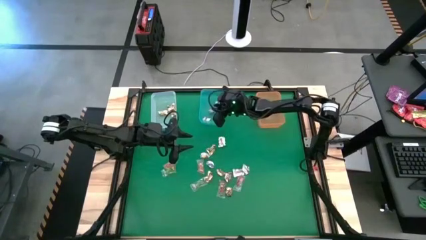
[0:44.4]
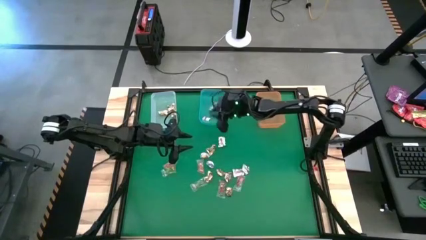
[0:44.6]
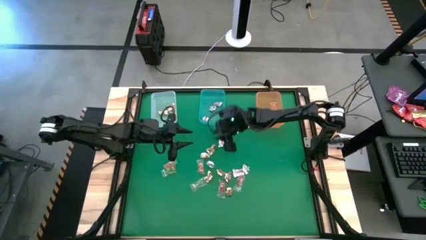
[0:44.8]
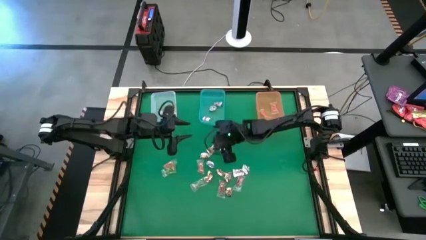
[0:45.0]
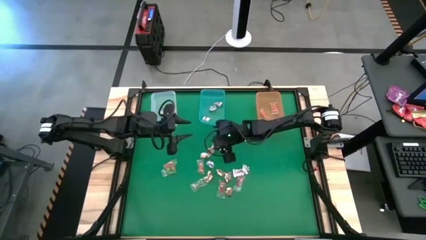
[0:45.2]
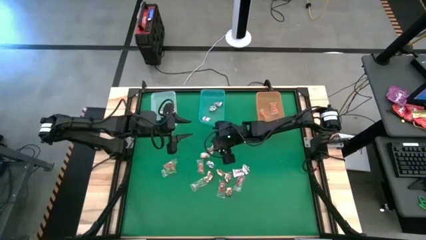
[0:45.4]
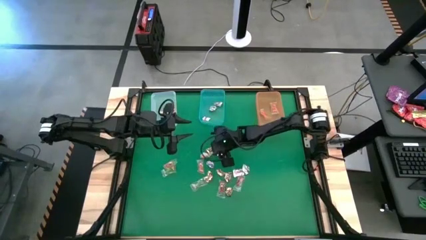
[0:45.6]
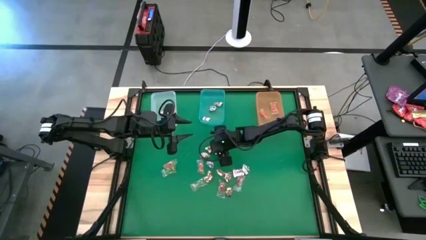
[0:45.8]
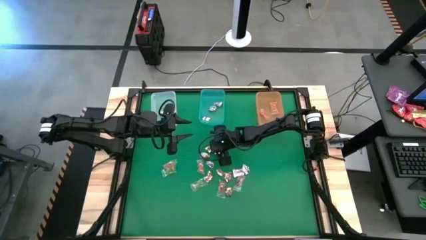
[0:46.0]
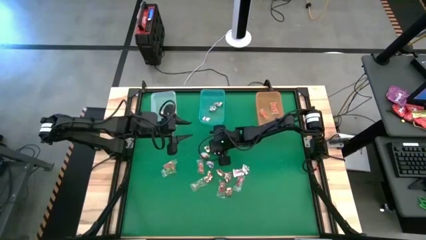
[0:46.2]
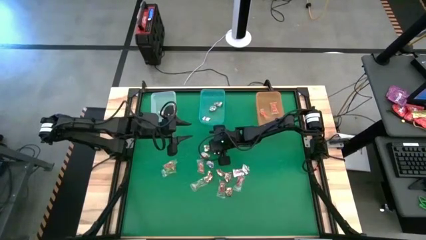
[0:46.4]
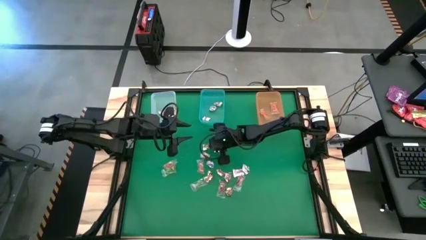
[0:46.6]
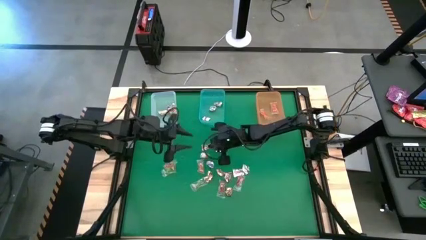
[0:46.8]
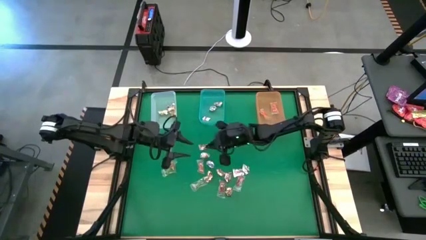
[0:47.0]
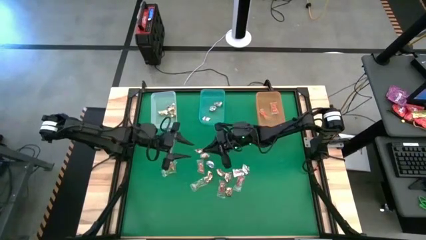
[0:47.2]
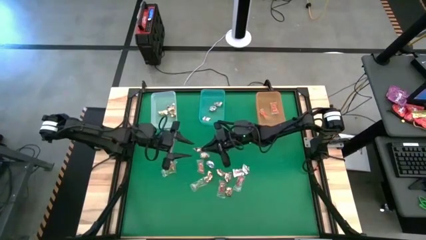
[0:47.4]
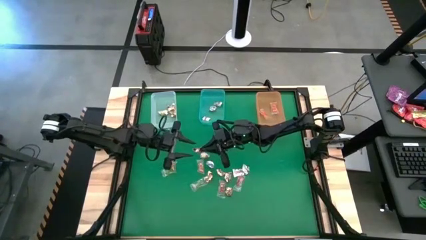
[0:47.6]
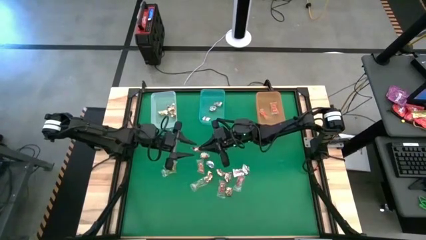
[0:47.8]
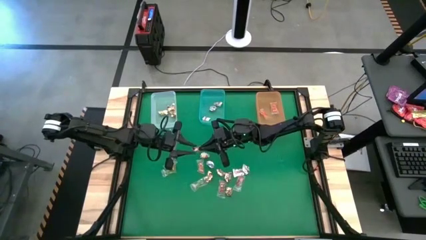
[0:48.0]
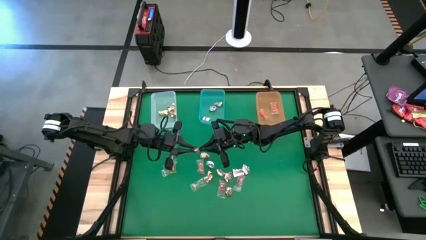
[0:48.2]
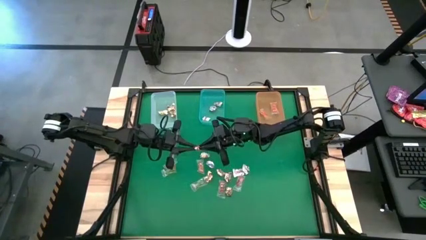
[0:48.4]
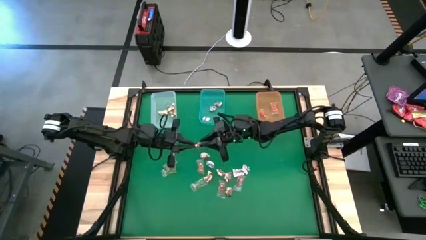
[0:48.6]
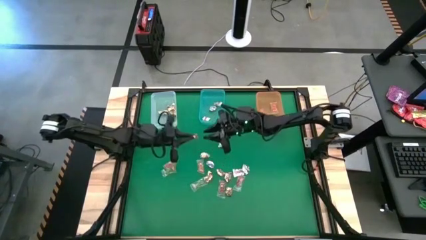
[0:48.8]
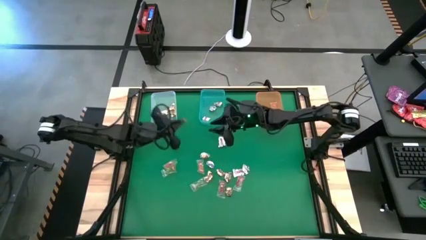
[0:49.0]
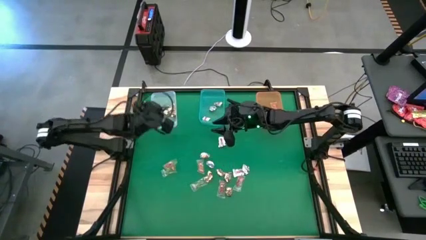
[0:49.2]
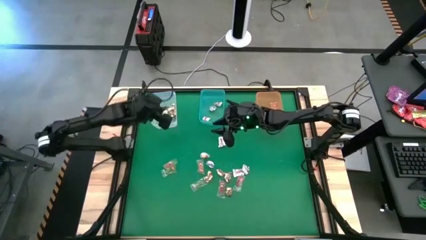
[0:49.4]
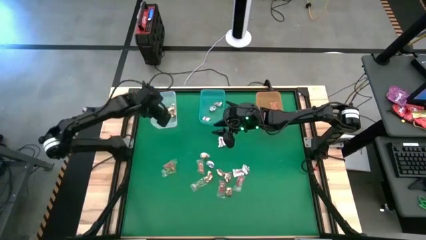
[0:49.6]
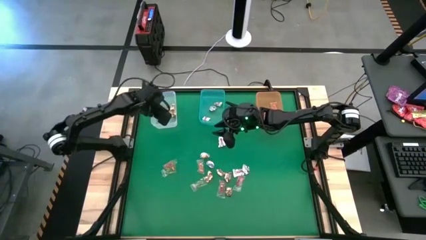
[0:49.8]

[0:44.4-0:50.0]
Task: Sort candy by brand, put in halloween buckets
Put the gold wrap candy into the white bin

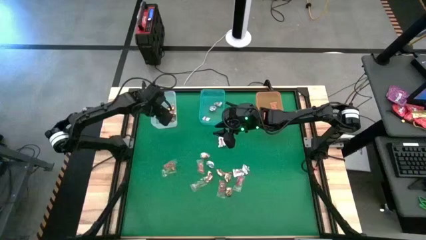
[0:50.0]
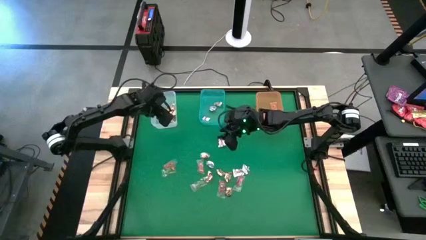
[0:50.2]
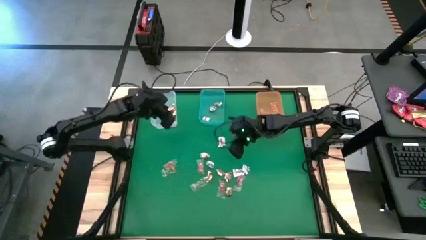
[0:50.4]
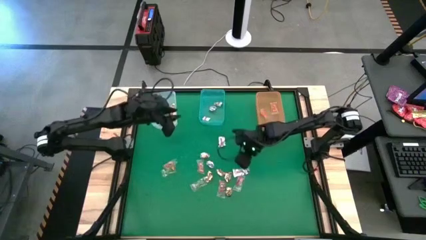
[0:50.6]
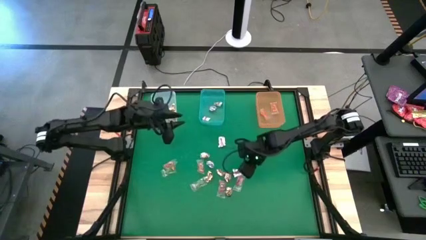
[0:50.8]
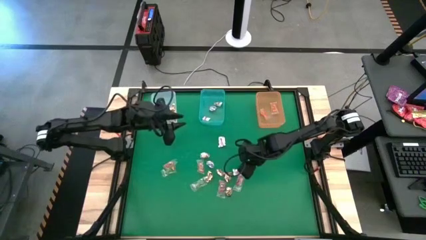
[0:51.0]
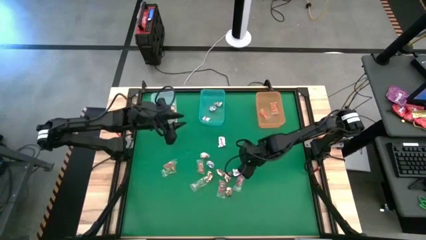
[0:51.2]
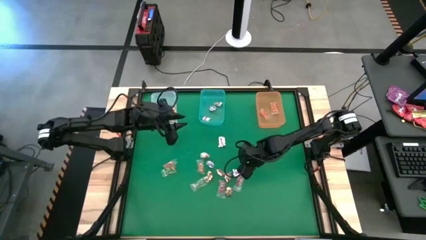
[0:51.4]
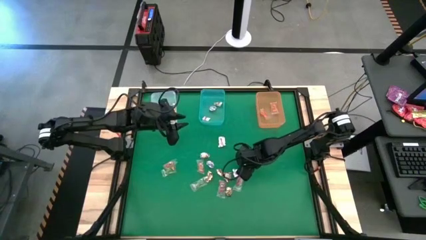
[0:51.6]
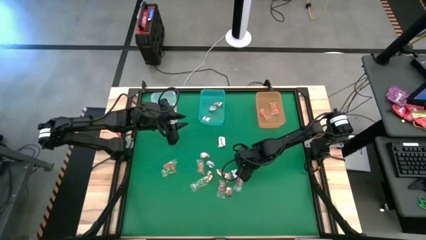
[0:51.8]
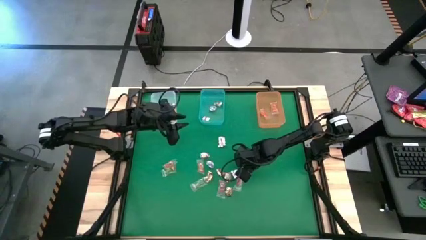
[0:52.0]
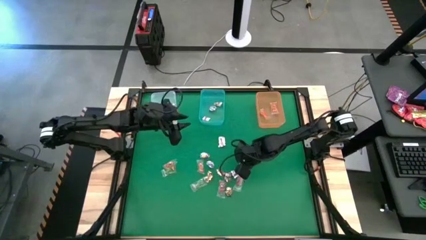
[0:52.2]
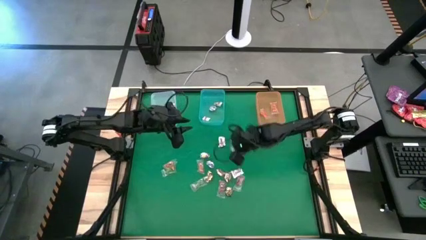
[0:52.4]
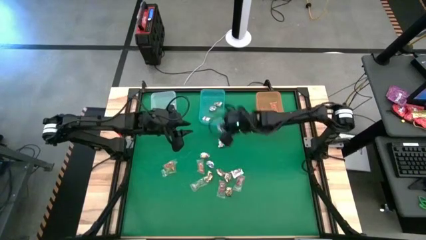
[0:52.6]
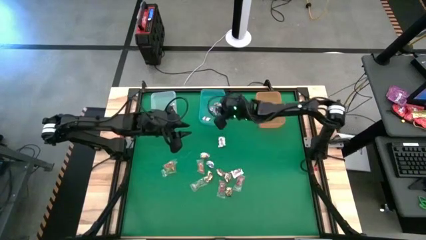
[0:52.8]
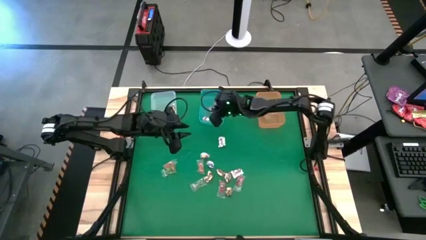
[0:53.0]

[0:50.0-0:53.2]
Put the silver wrap candy into the blue bin

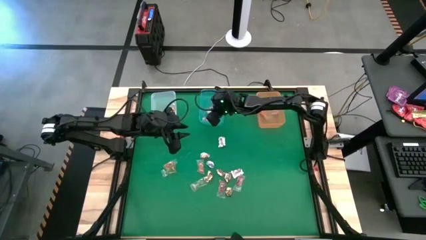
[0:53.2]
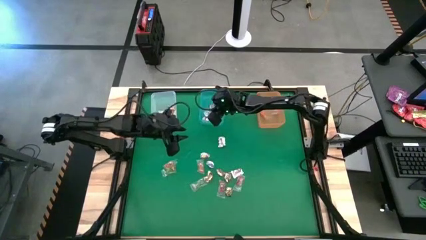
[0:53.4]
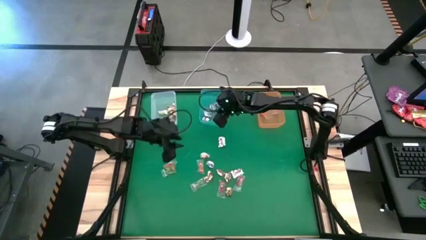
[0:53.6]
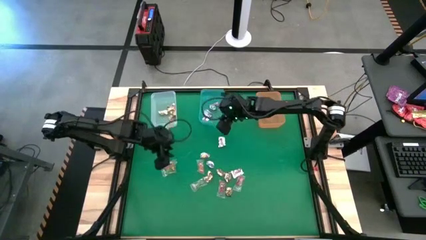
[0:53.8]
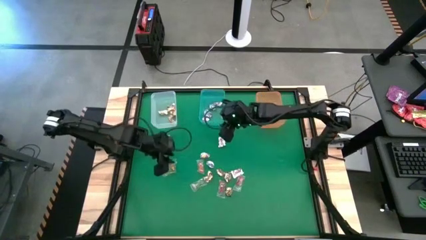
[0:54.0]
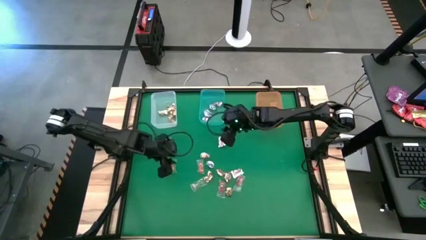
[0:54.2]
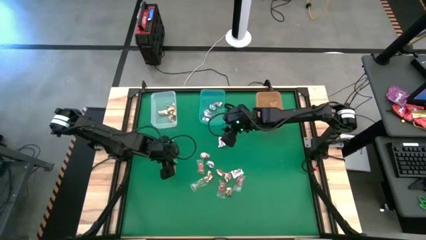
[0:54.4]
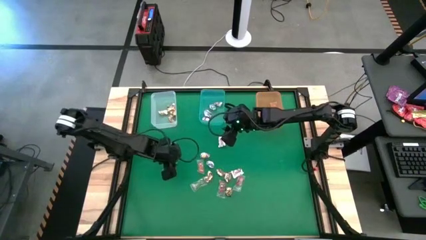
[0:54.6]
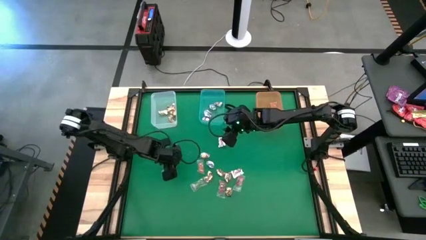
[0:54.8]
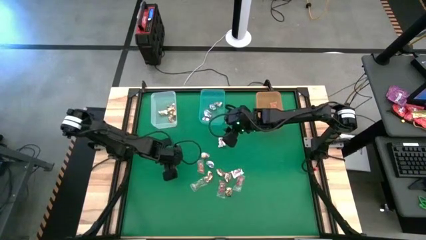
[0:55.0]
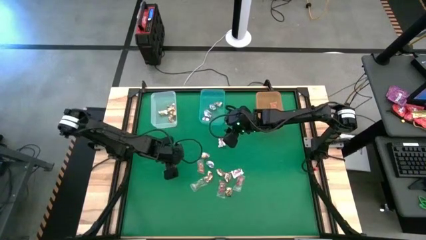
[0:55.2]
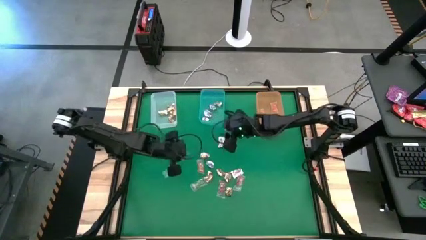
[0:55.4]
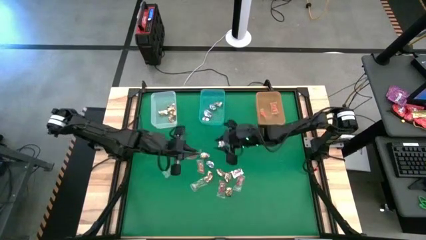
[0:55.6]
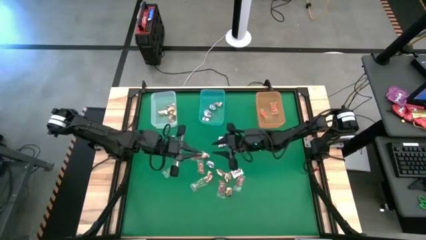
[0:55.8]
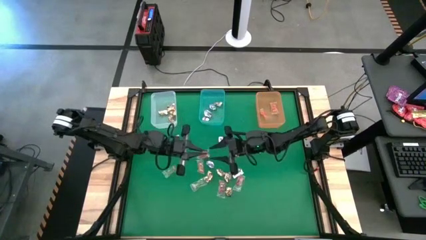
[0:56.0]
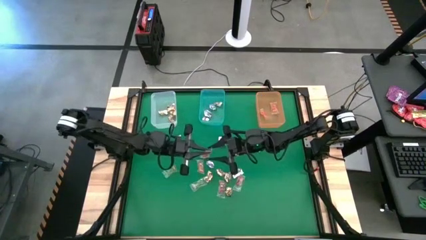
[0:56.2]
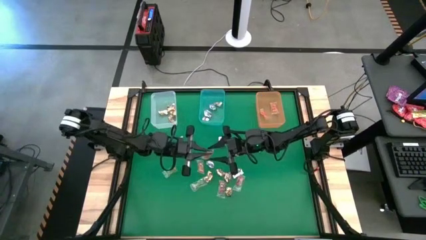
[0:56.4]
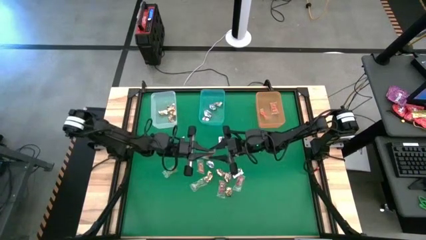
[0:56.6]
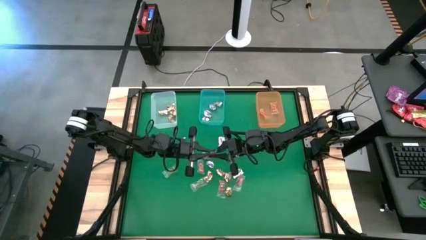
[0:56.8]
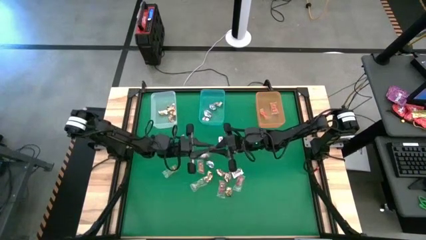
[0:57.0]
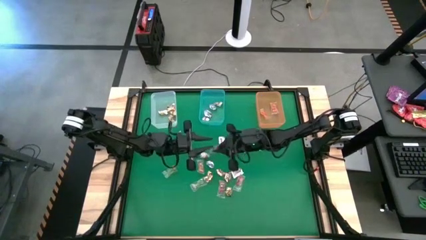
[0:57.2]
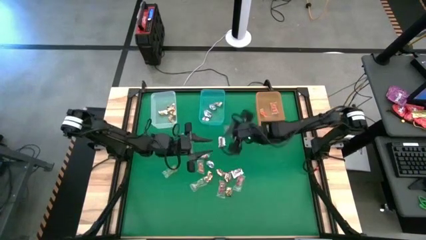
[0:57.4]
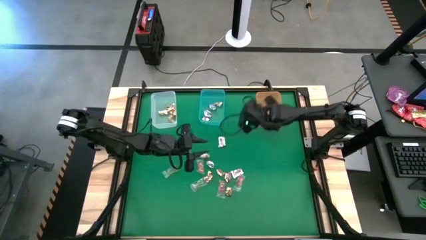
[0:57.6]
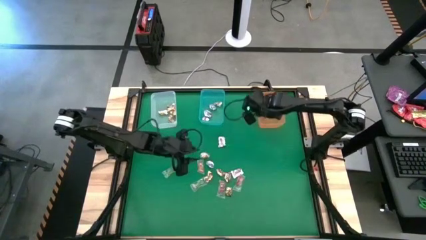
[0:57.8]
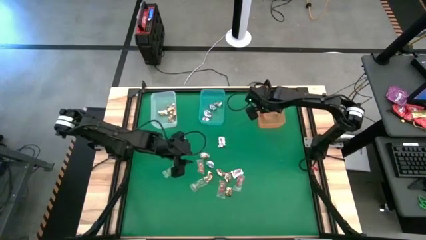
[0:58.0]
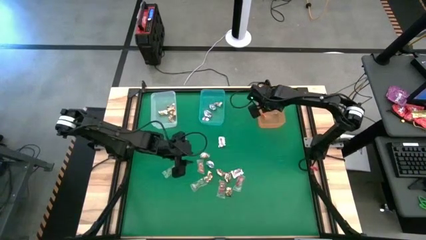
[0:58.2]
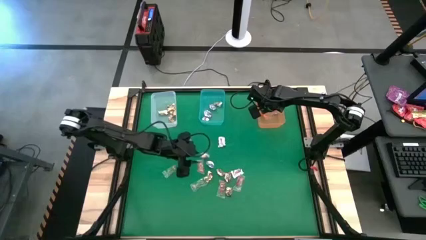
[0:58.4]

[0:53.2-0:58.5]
Put the orange gummy into the orange bin

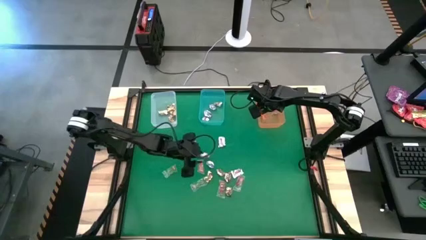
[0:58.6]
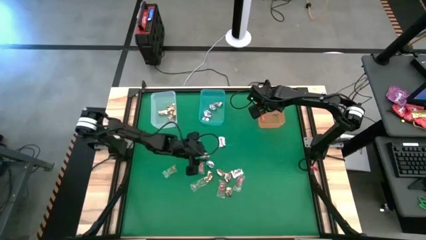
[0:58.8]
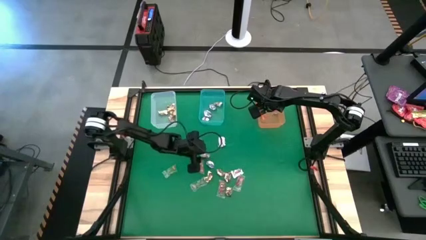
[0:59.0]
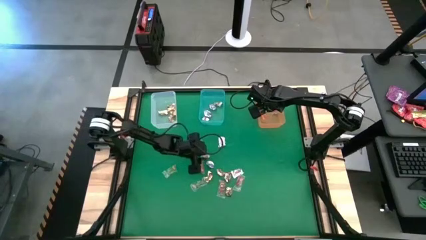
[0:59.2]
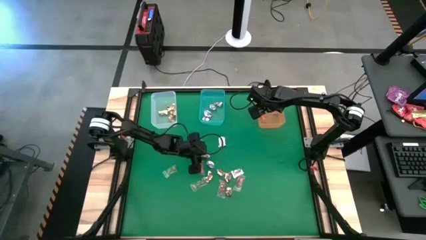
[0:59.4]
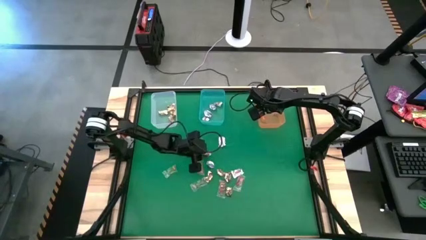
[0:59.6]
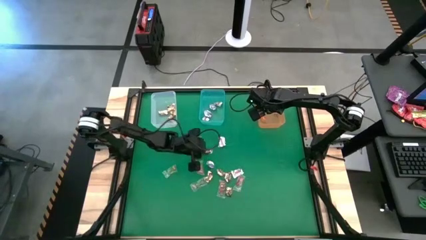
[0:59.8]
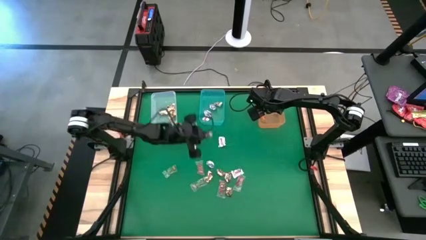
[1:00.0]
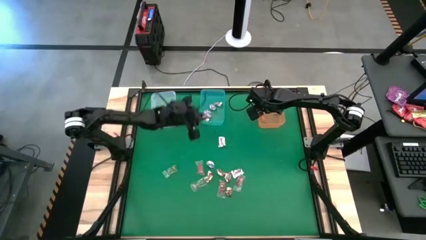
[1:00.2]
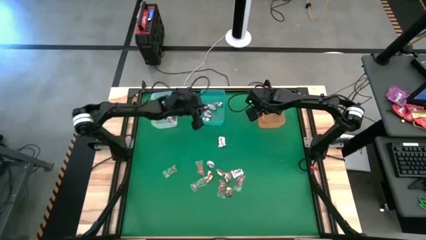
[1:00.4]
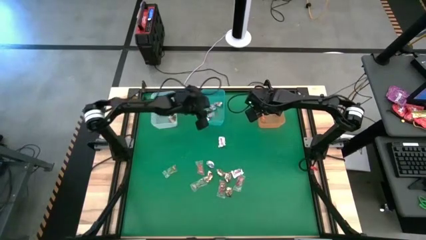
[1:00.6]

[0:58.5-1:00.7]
Put the silver wrap candy into the blue bin

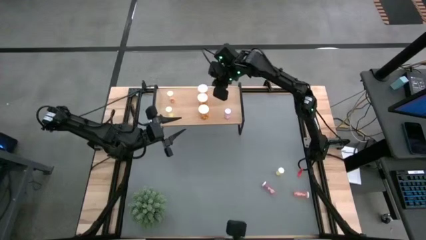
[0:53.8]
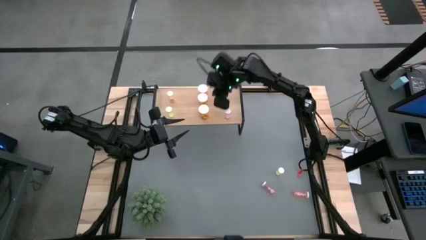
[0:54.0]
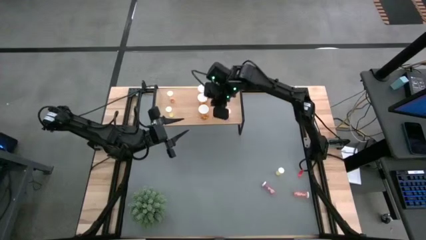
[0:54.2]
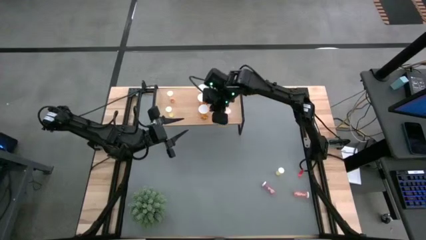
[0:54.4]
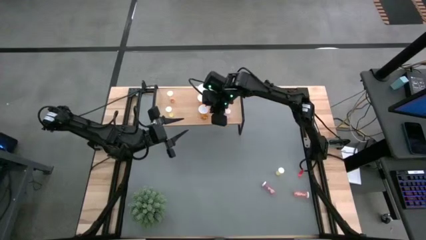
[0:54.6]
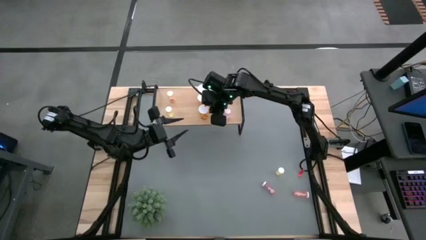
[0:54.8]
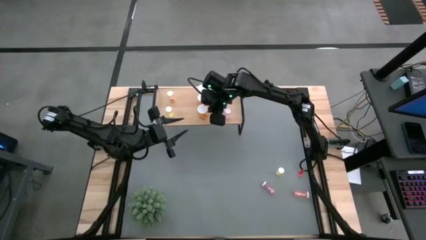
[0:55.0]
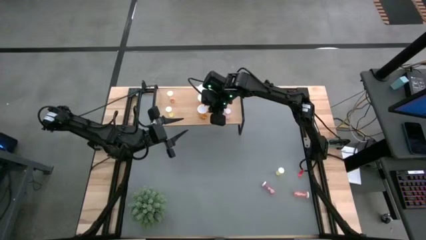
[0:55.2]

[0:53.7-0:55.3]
Task: Pick and place medicine bottles onto shelf by color
Adjust the orange pill bottle on the shelf
